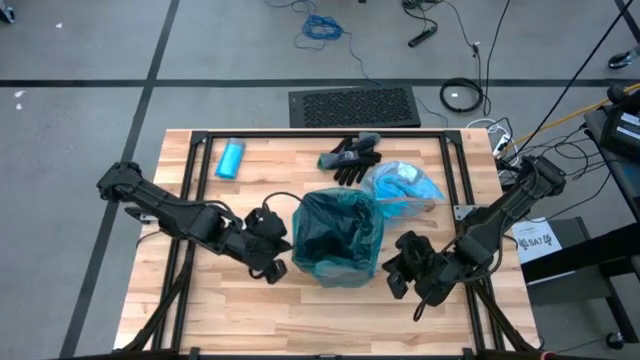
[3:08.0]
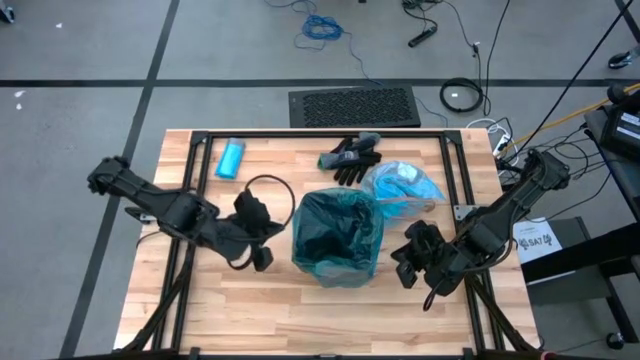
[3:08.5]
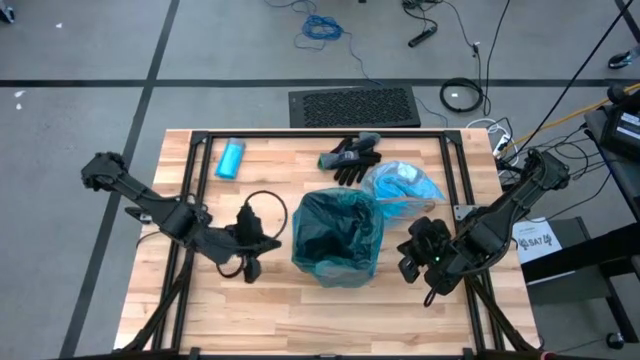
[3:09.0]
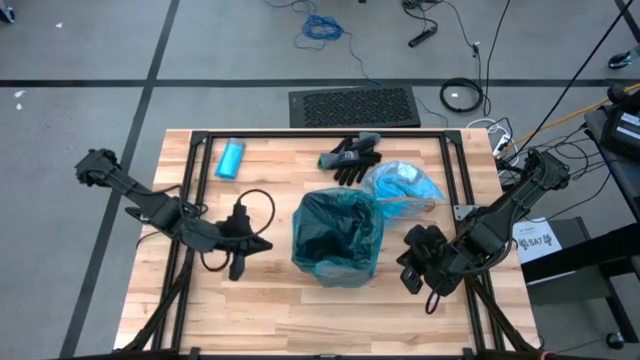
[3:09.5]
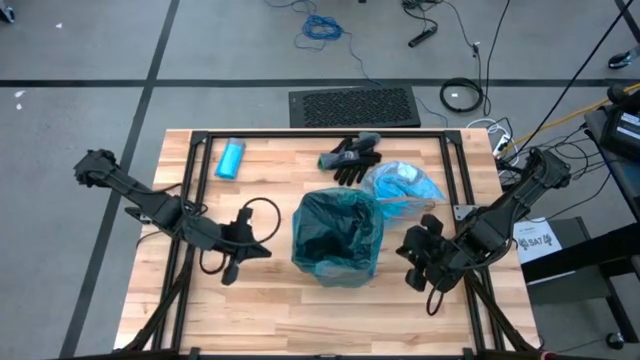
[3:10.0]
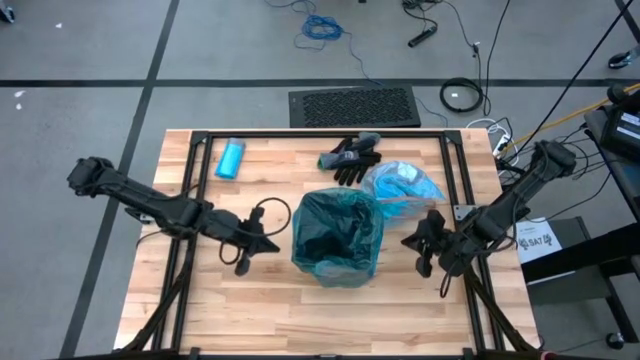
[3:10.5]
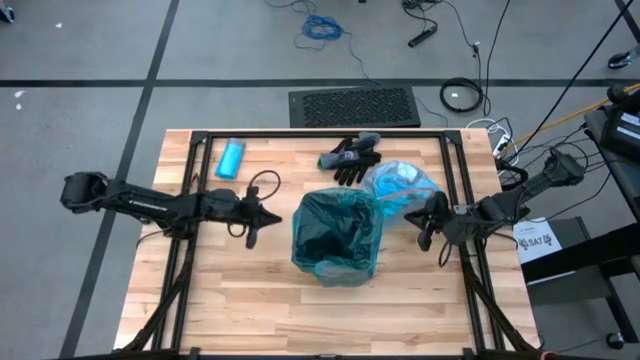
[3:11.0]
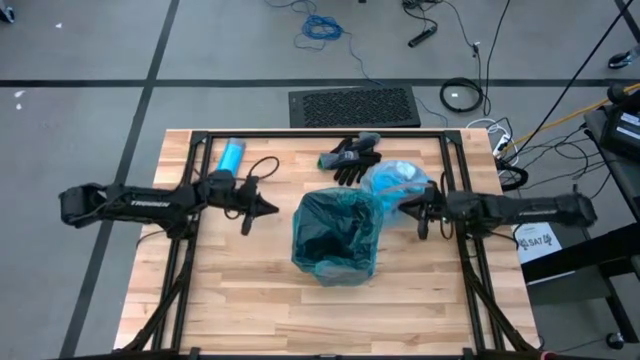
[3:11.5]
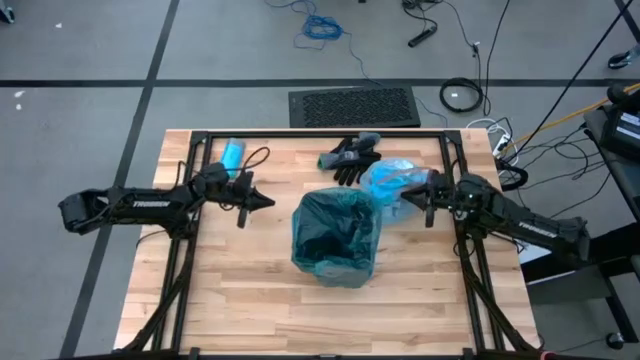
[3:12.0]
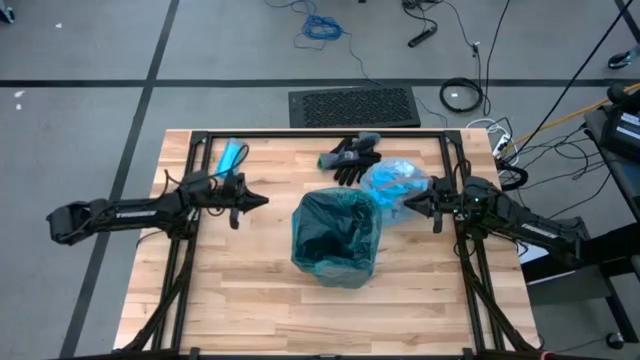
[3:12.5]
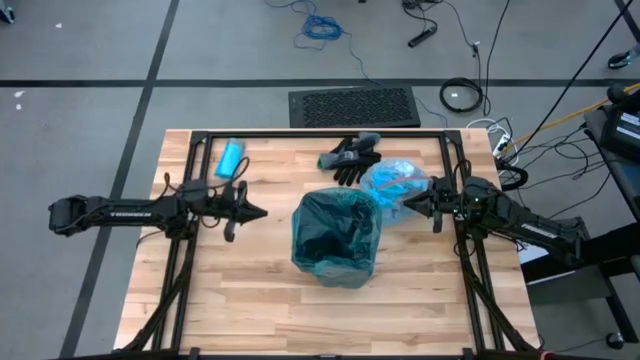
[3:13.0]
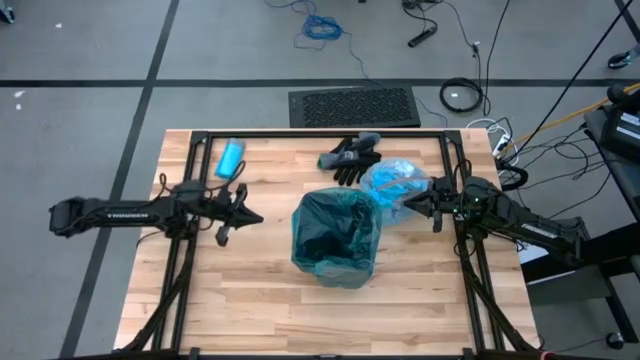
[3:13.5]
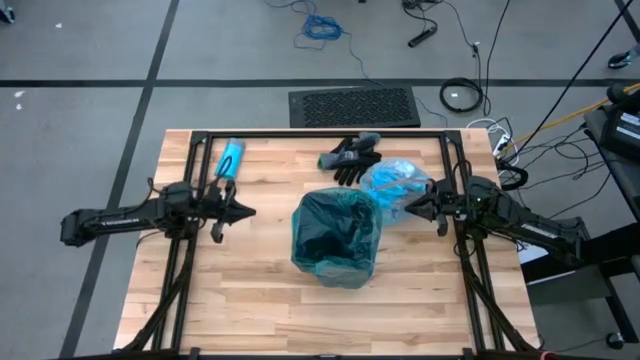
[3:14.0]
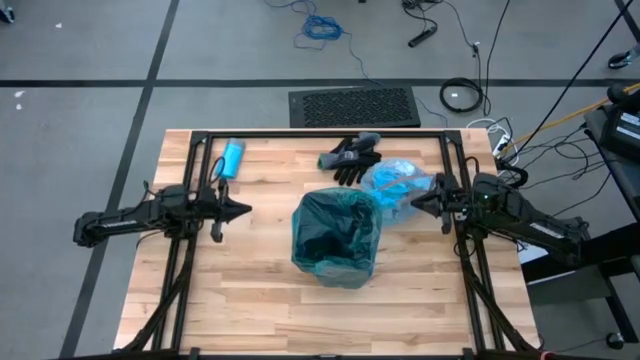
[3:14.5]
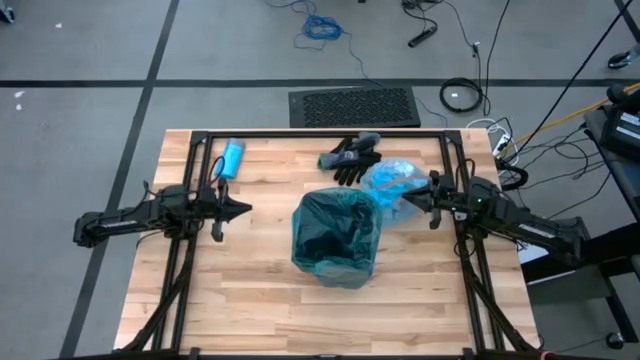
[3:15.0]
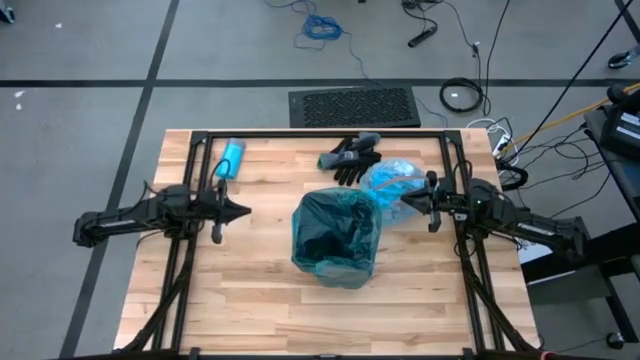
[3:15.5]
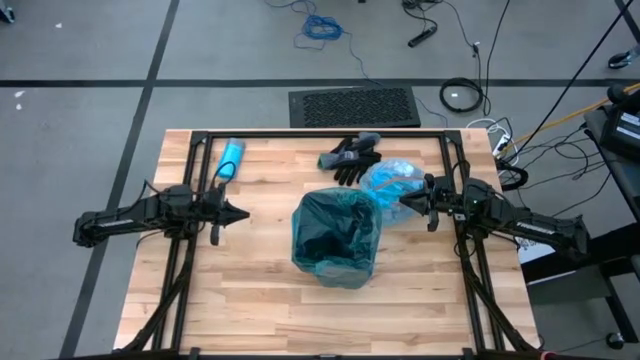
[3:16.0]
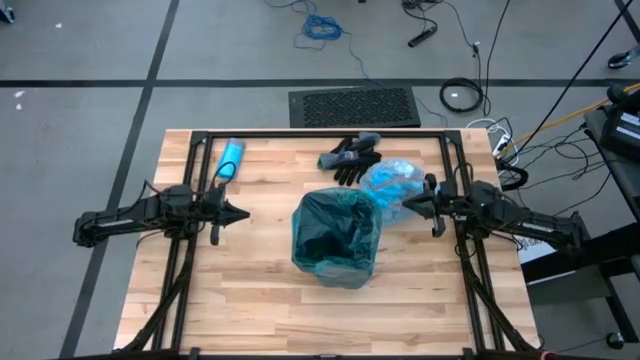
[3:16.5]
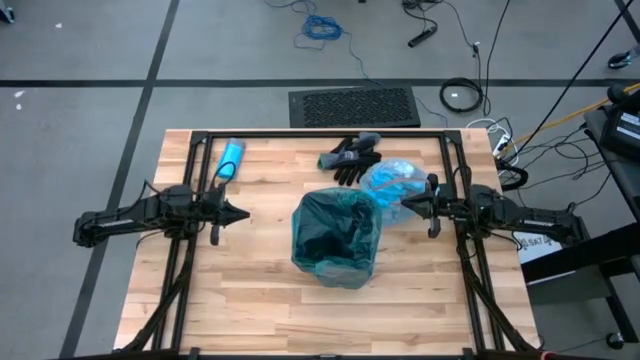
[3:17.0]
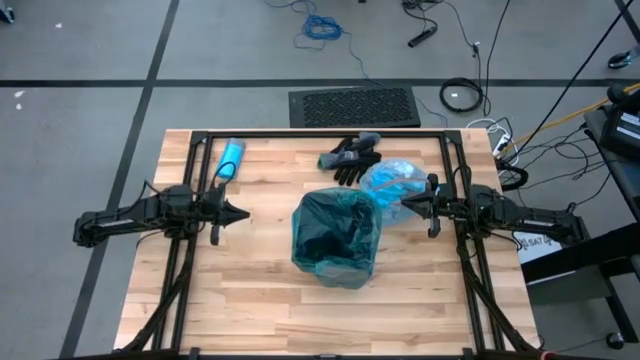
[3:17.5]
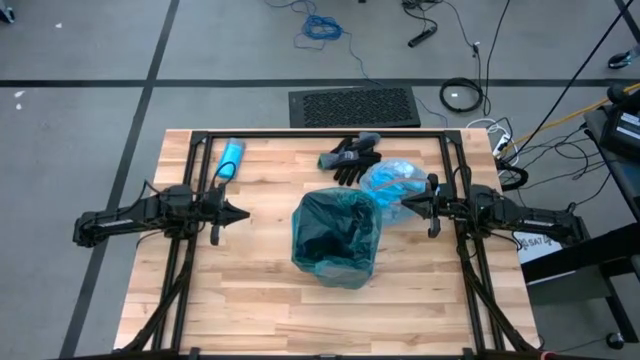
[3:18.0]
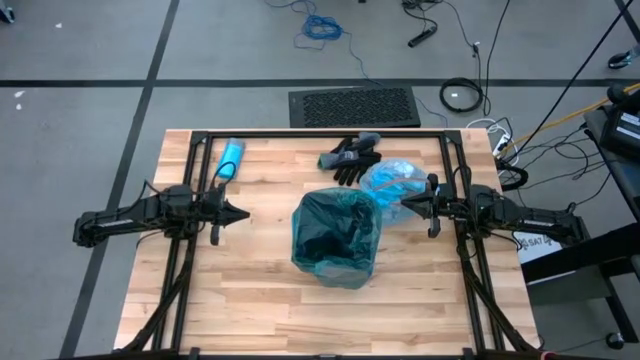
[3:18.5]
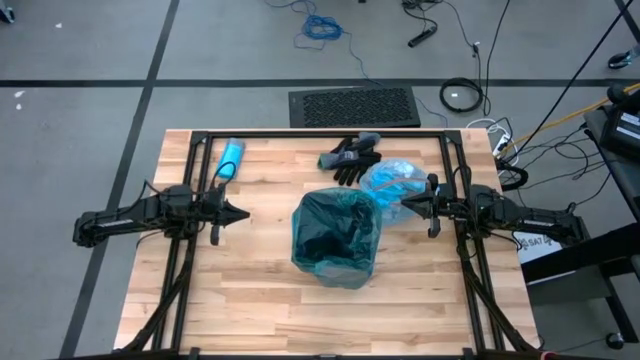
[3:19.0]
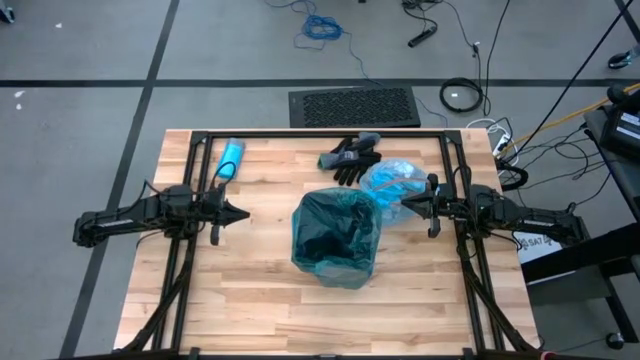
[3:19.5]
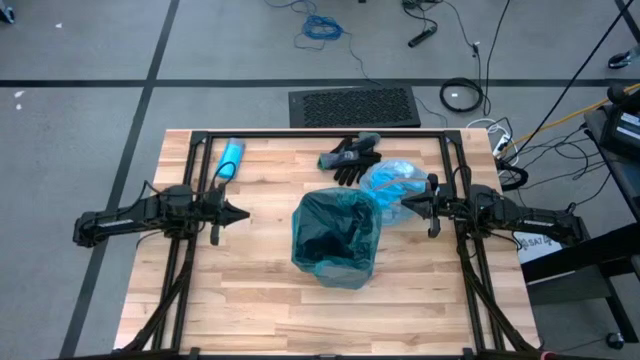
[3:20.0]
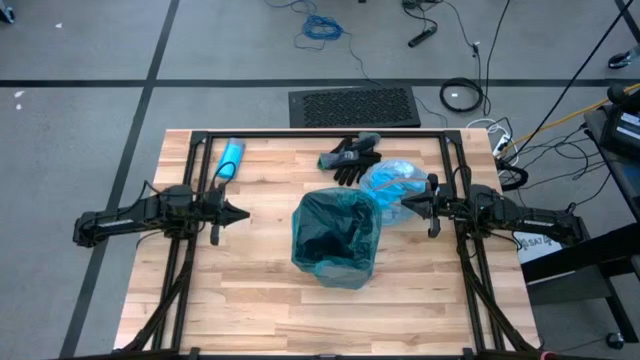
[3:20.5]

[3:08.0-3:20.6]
Task: place trash/remove bag and relplace
Return To Home Position

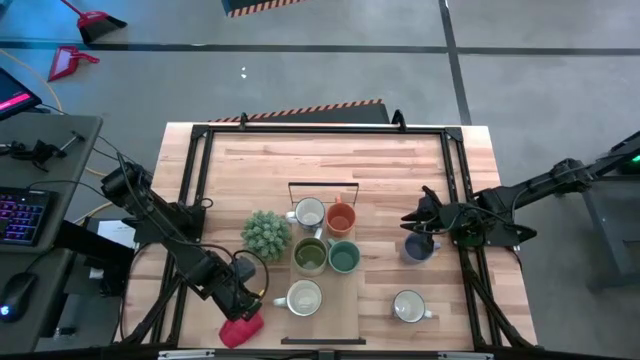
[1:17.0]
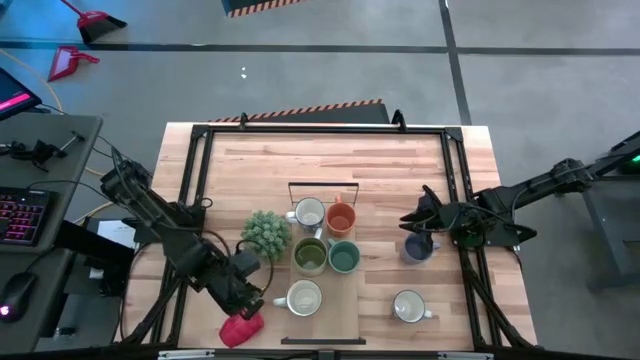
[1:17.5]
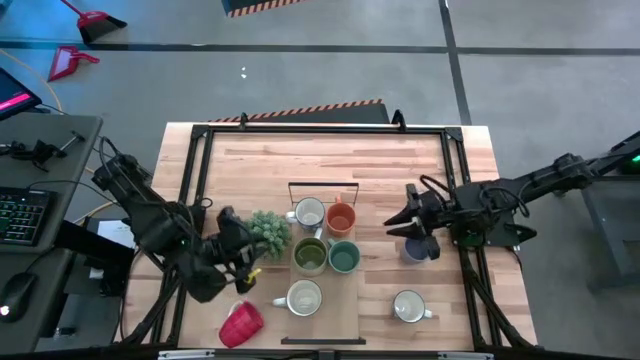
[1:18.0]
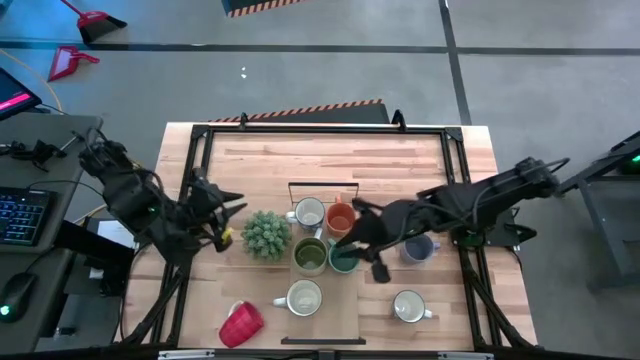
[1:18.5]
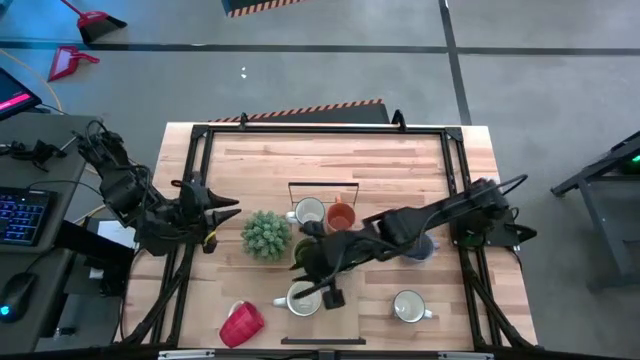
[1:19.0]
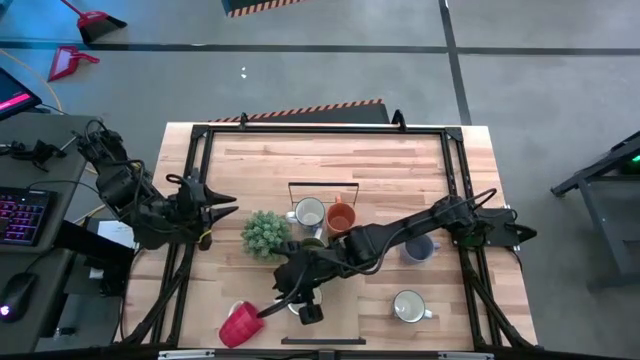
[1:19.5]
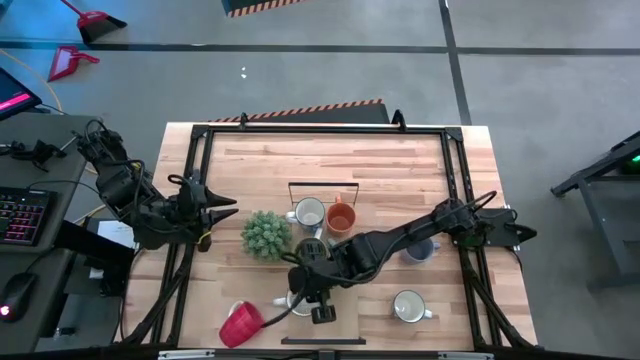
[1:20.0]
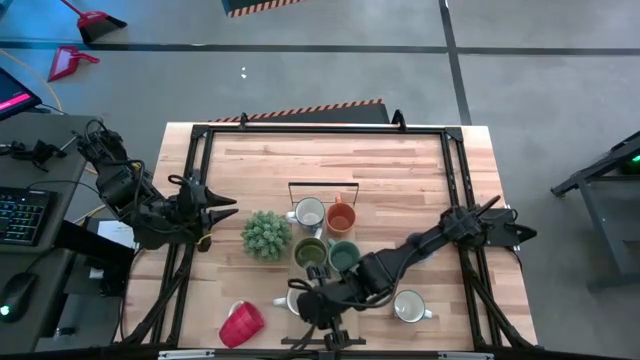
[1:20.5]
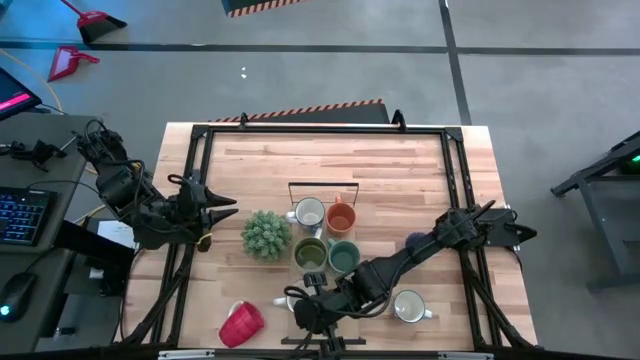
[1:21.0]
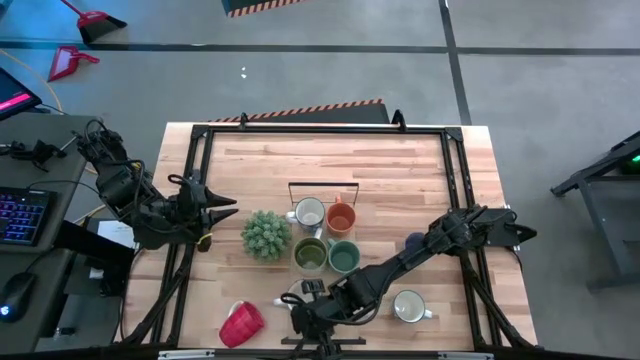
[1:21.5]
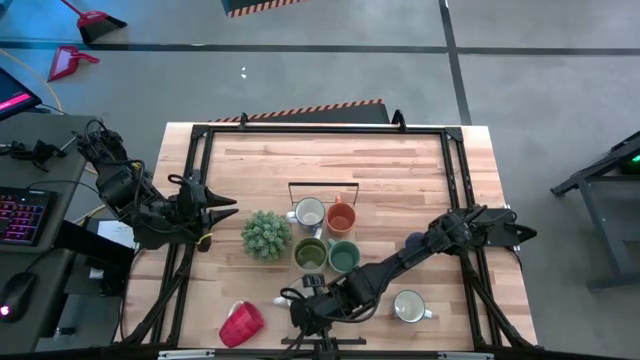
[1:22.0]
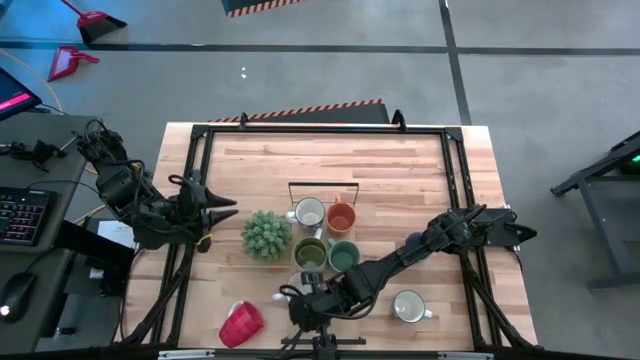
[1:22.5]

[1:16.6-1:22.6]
Task: Place coffee mugs
Adjust the white yellow mug on the shelf
